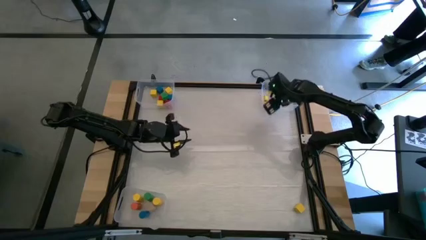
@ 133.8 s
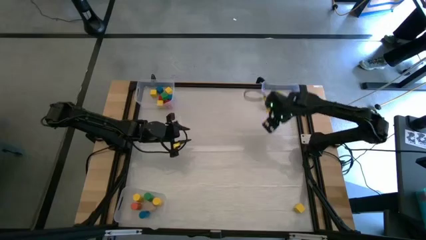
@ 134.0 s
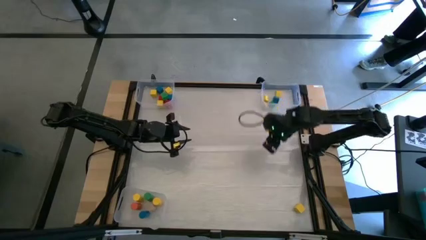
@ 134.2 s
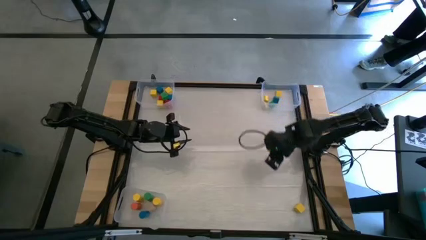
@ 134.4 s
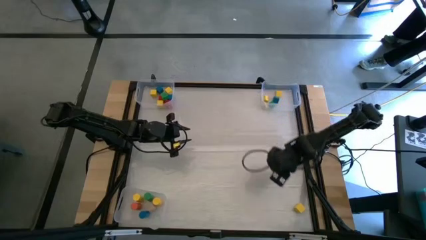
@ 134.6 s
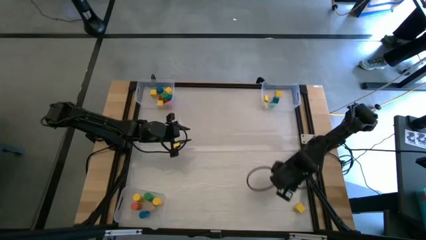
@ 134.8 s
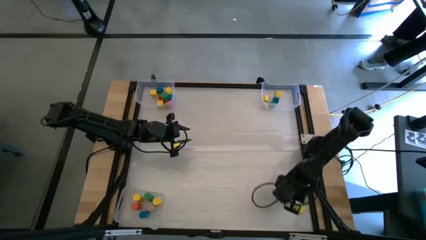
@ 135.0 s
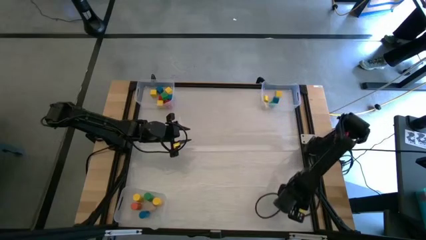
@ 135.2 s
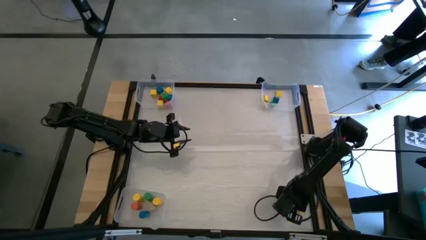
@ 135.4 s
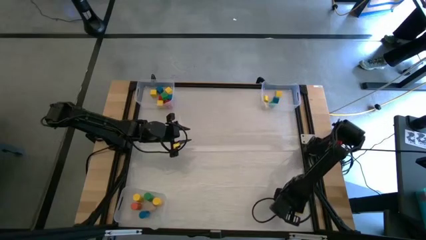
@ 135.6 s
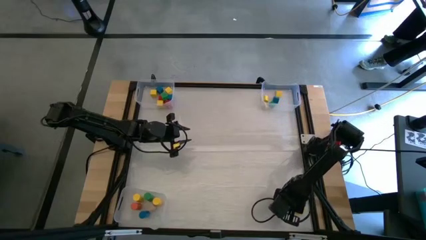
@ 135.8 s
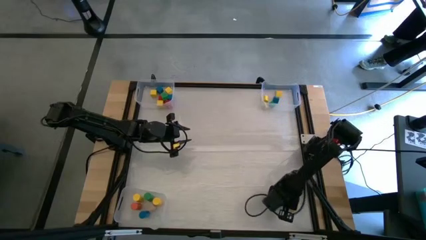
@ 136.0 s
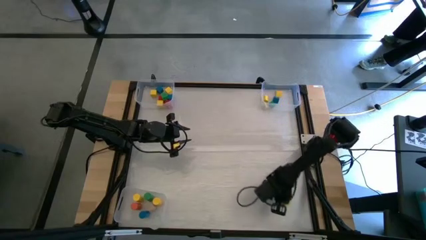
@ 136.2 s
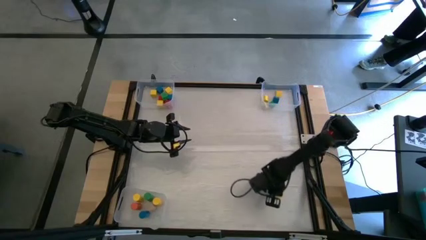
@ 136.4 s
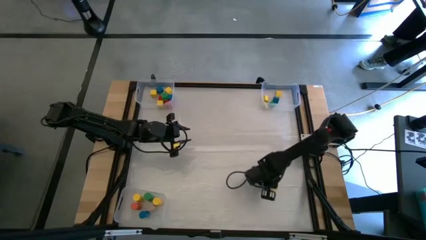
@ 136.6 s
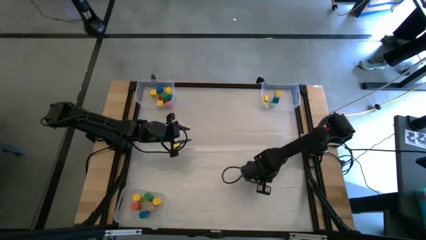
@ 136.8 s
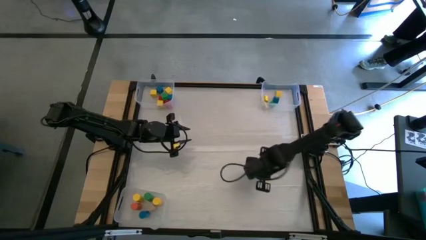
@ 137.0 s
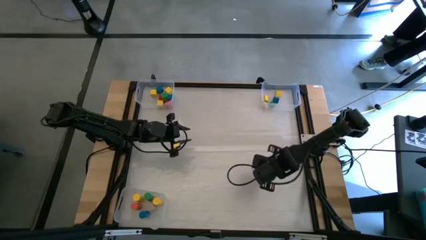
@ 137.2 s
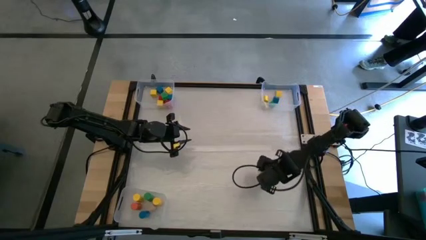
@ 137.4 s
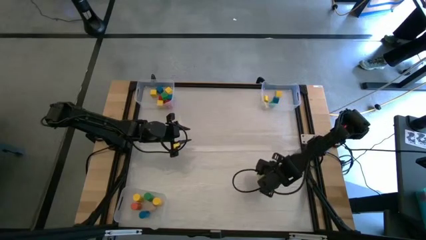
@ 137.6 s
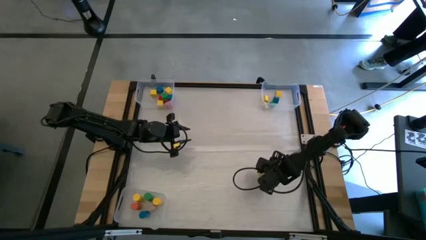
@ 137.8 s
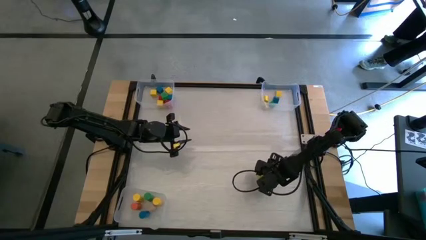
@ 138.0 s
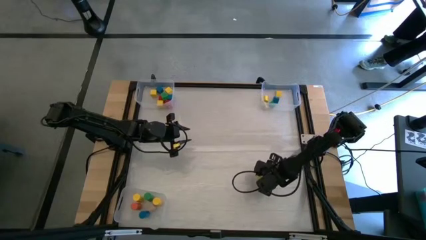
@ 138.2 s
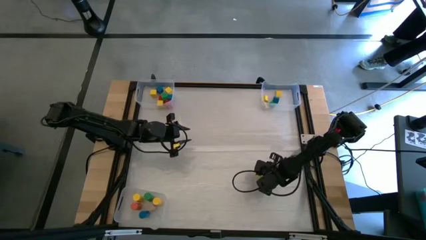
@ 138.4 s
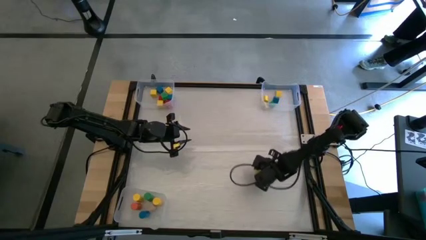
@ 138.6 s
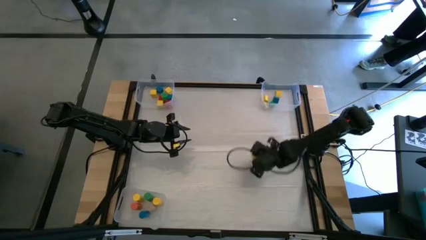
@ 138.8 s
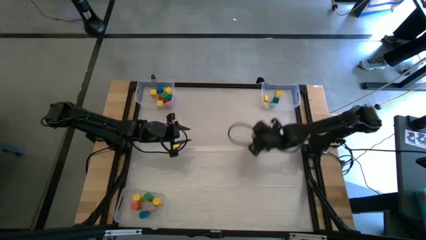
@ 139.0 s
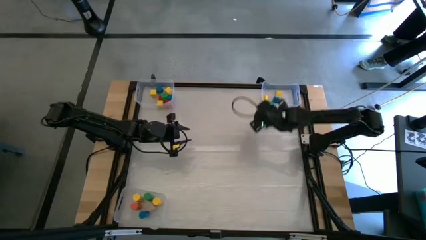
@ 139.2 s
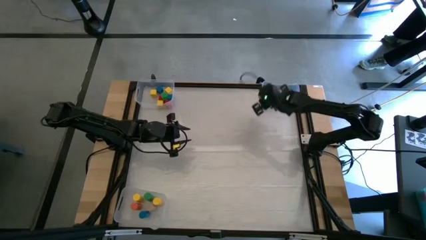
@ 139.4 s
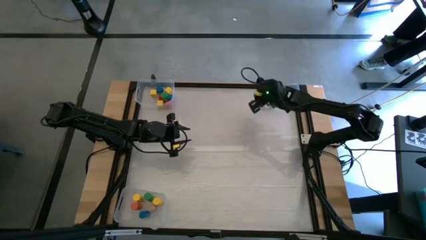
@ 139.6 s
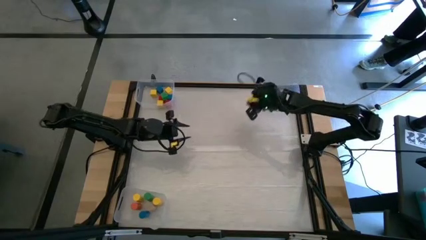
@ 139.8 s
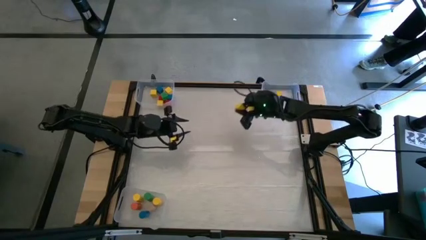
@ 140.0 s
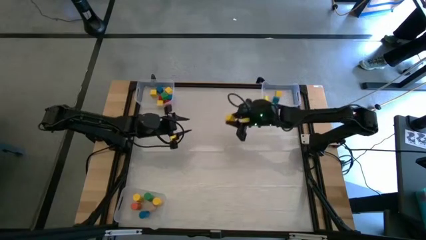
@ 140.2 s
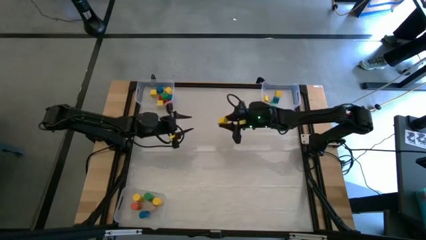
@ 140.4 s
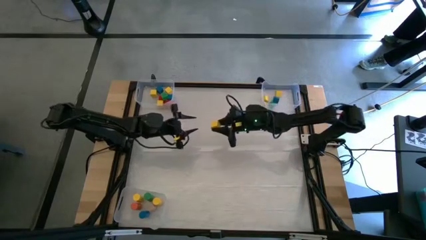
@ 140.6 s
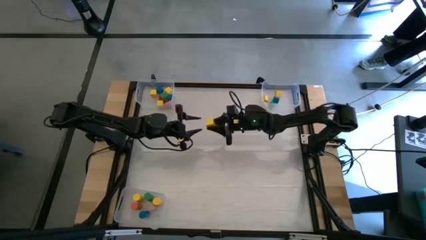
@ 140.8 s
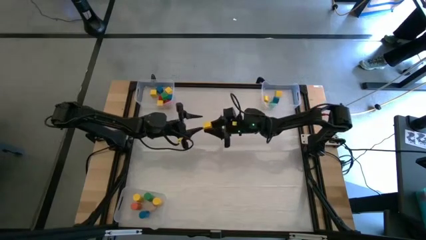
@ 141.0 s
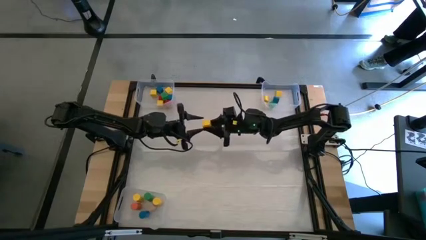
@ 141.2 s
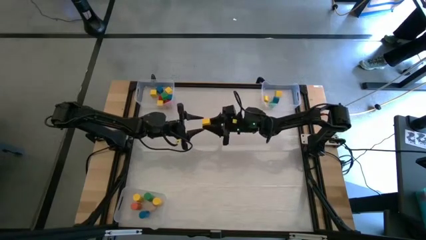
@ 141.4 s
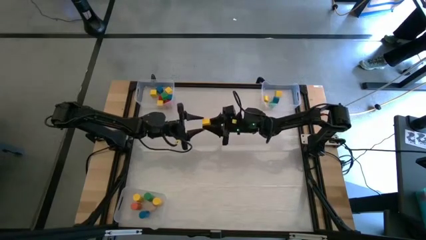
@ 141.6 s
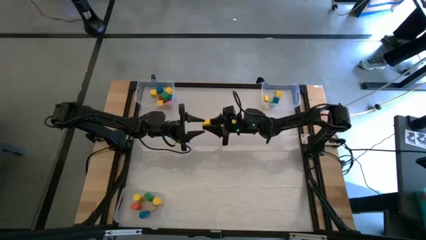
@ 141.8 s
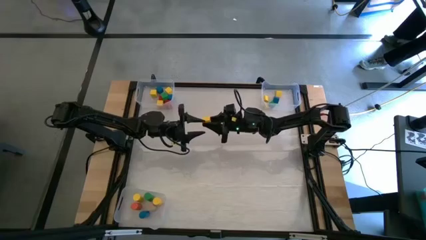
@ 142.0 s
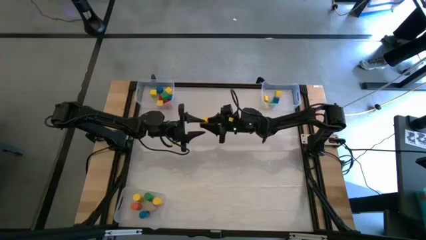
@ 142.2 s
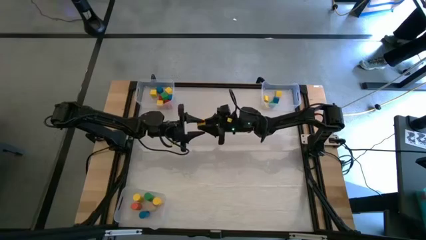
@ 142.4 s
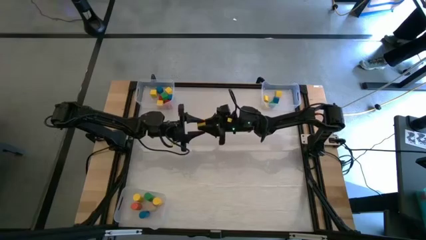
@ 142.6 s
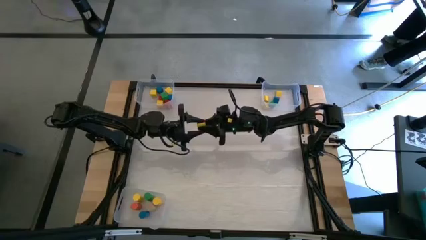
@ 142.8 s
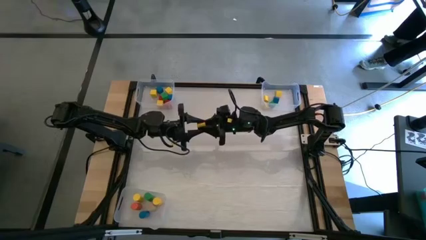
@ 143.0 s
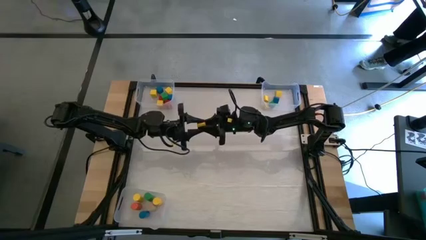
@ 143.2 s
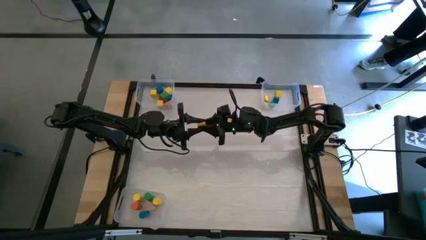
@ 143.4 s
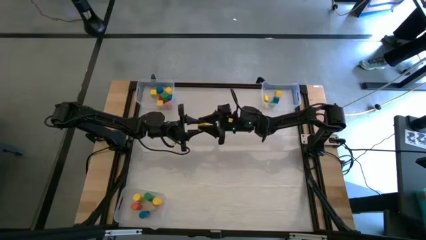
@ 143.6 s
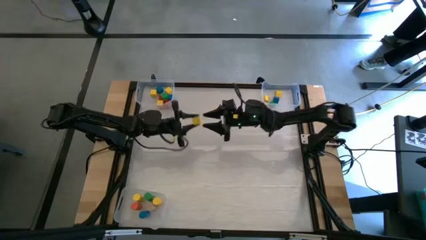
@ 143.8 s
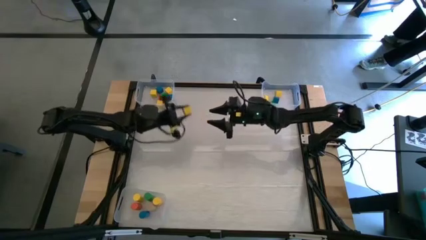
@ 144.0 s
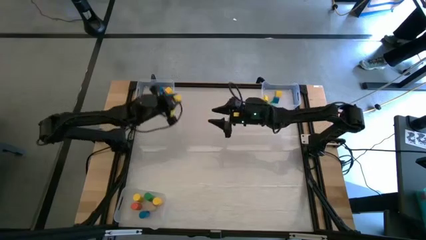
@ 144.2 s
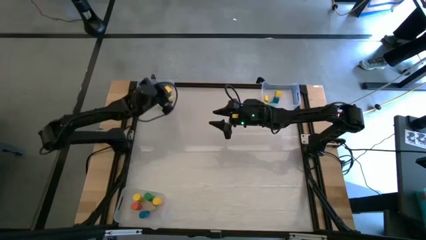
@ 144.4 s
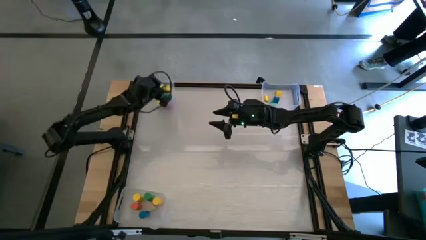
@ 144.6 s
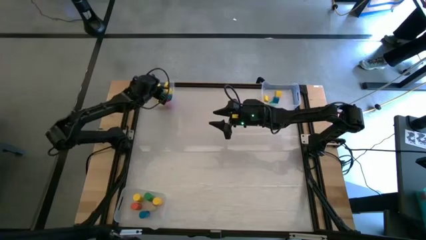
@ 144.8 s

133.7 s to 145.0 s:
Task: Sort blocks by size
Put the yellow cube block into the top left transparent bin

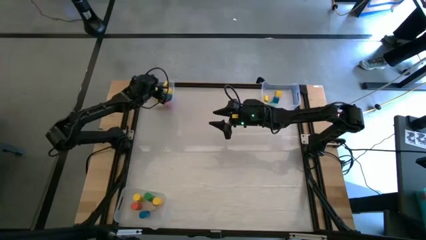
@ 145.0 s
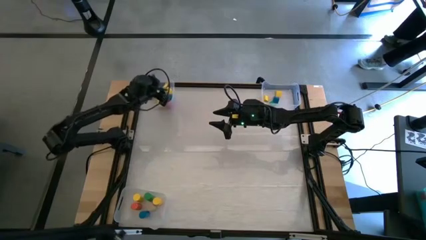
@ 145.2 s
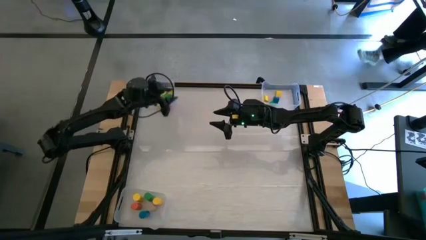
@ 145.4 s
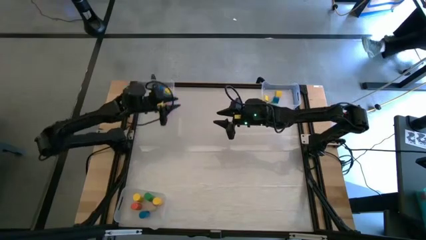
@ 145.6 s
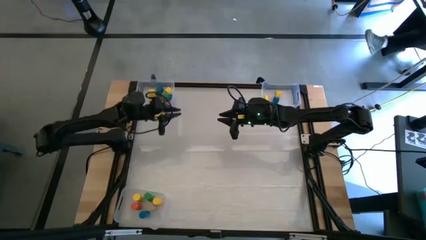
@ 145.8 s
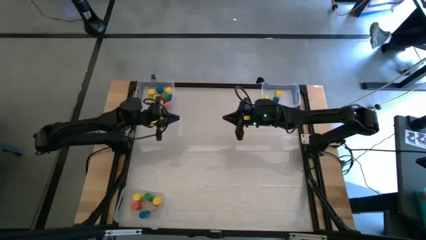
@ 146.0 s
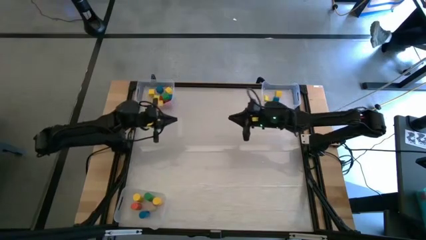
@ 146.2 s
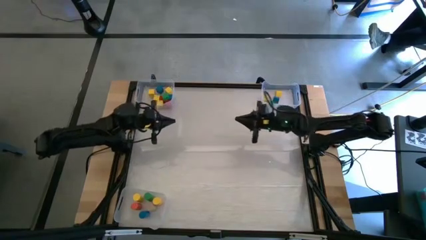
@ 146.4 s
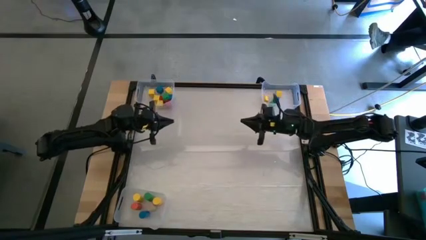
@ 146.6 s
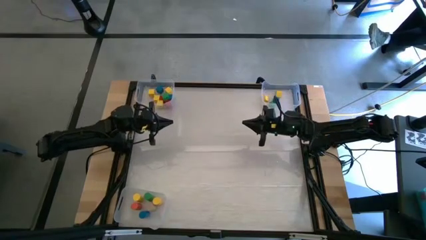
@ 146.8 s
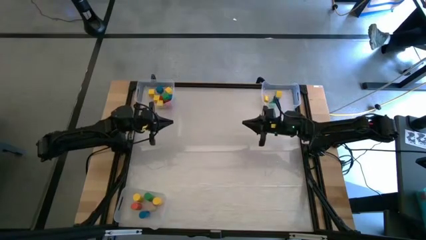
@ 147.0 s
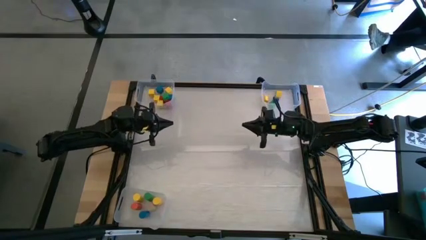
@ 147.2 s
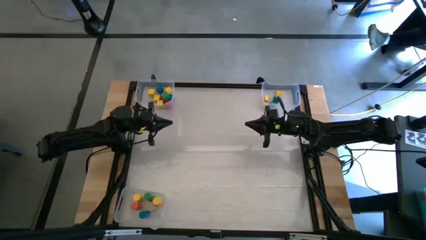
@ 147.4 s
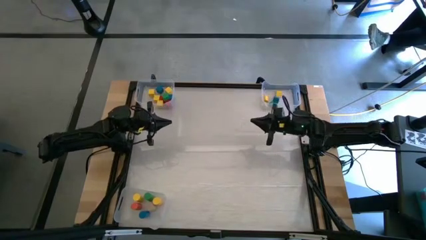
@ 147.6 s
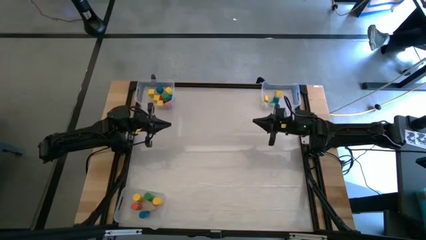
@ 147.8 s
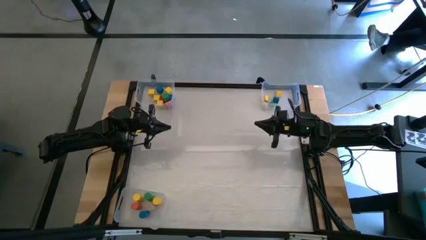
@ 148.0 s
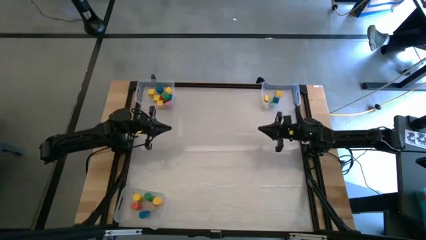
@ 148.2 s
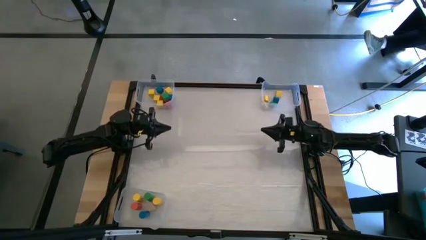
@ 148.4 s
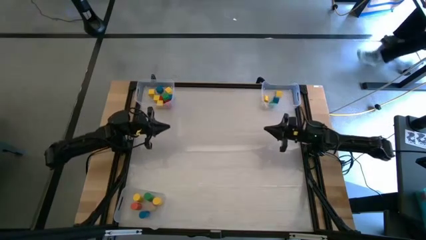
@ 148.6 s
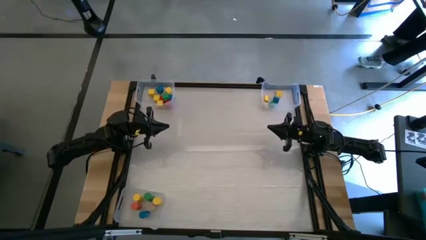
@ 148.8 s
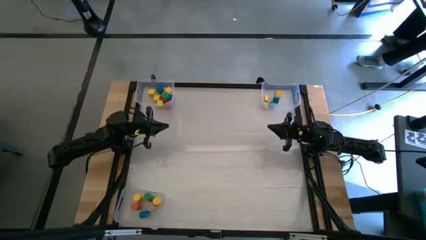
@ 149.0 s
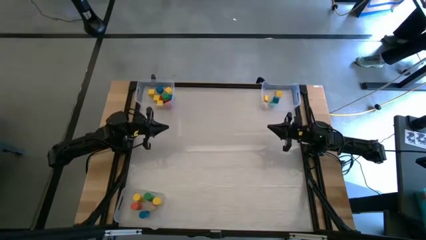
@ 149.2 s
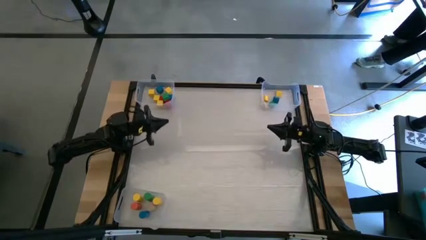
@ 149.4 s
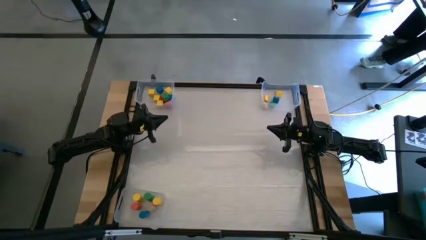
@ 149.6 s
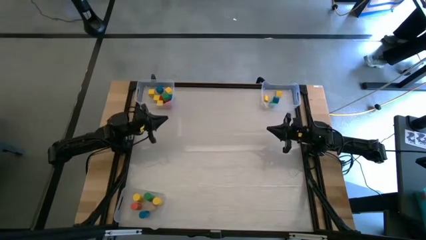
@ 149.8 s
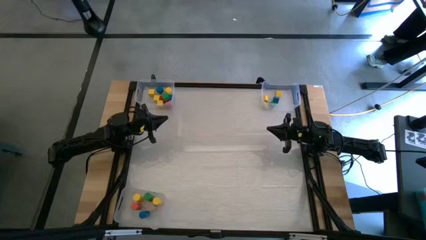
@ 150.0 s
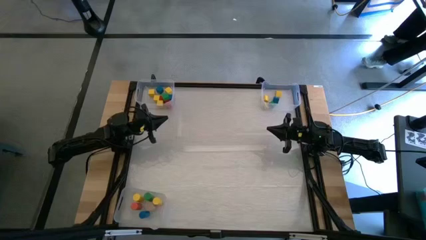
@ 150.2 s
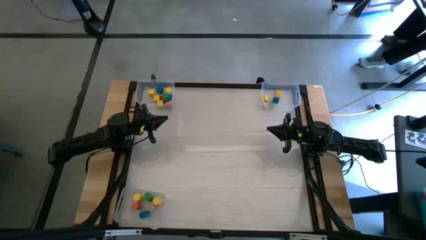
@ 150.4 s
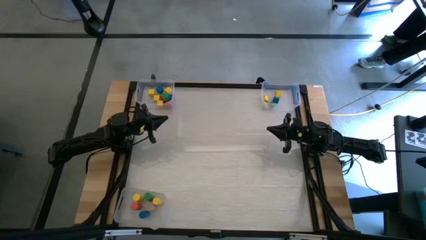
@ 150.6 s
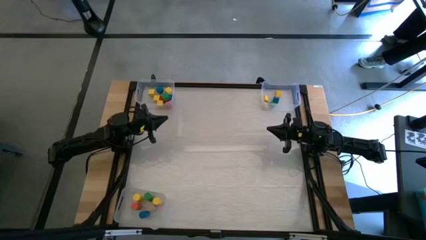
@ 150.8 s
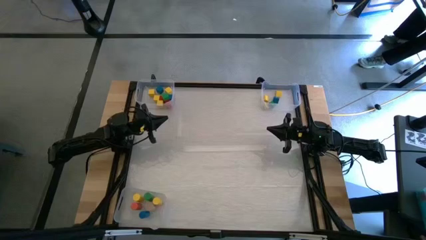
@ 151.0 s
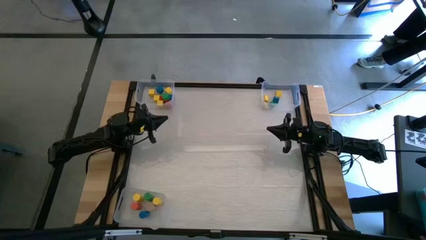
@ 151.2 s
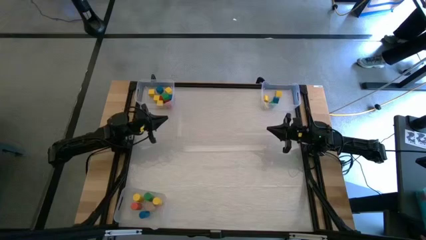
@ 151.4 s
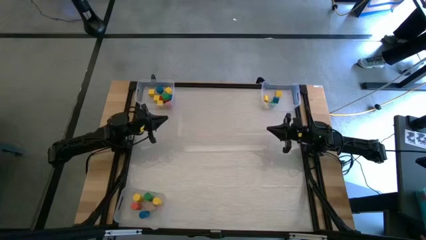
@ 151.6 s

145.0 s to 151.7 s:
Return to Home Position
